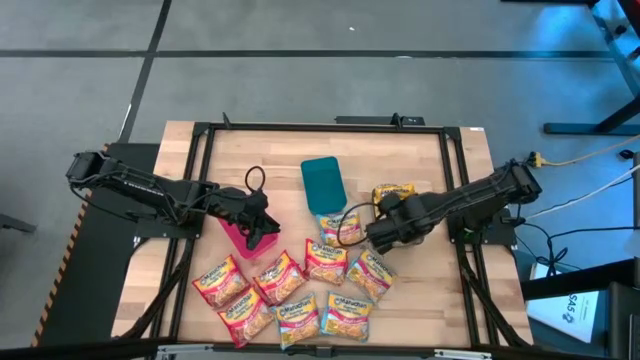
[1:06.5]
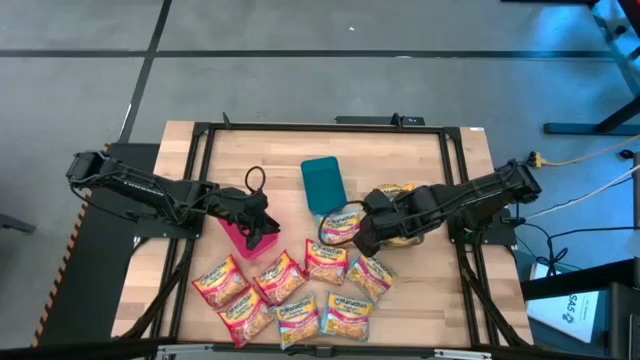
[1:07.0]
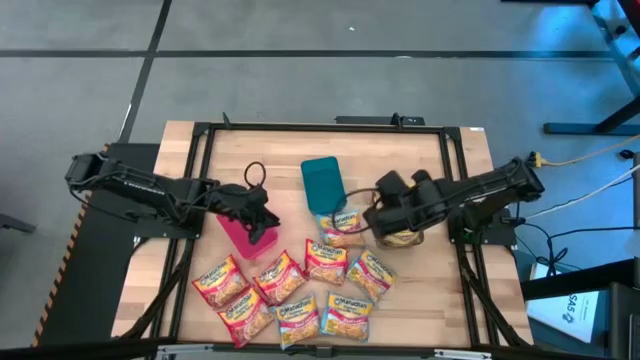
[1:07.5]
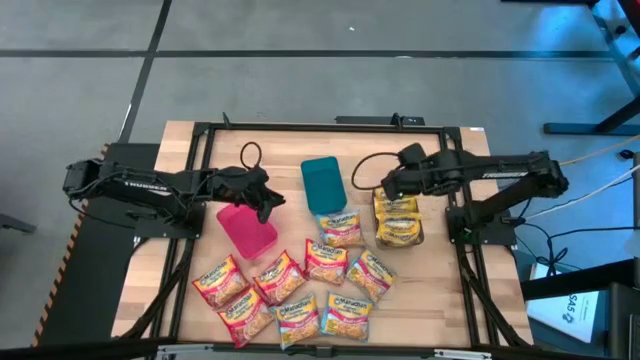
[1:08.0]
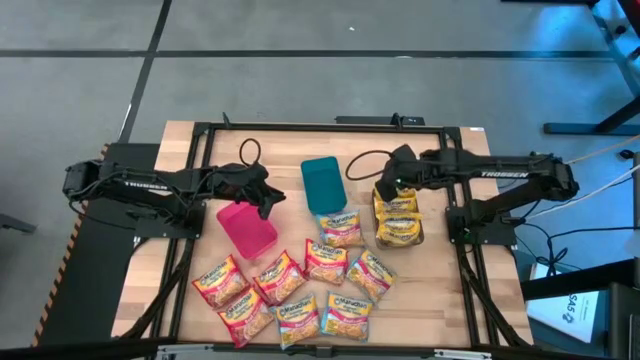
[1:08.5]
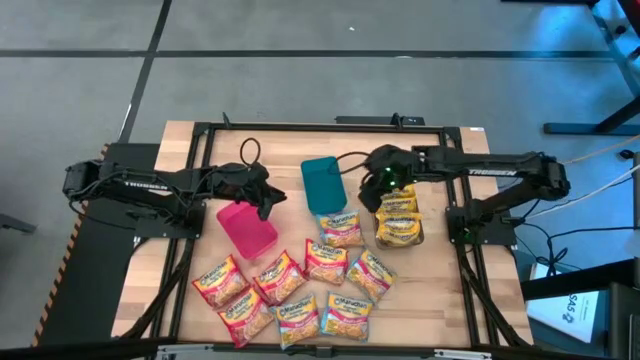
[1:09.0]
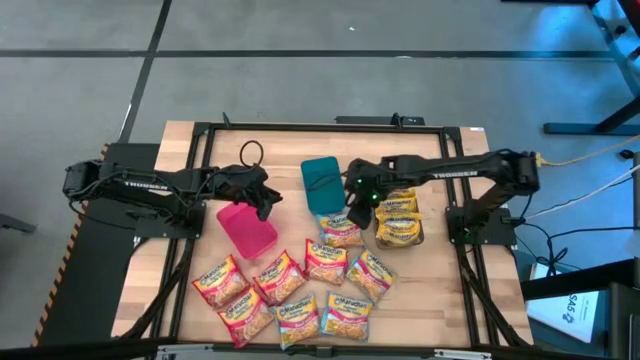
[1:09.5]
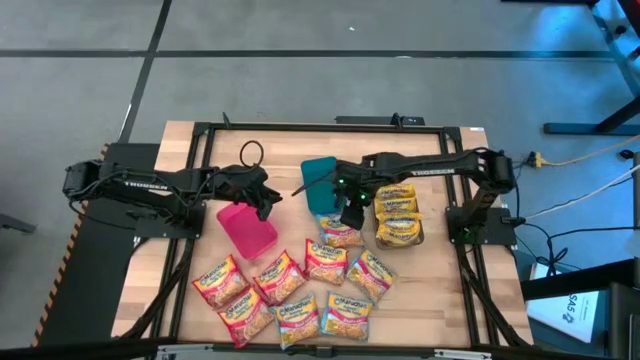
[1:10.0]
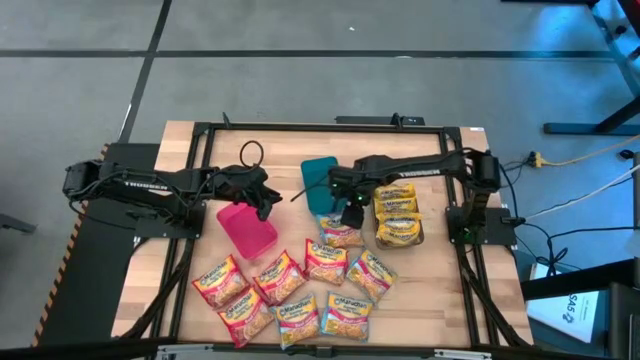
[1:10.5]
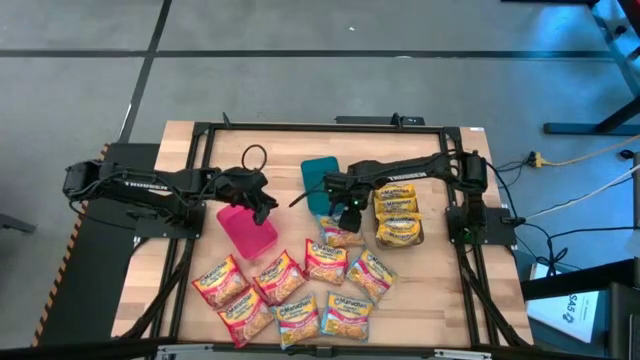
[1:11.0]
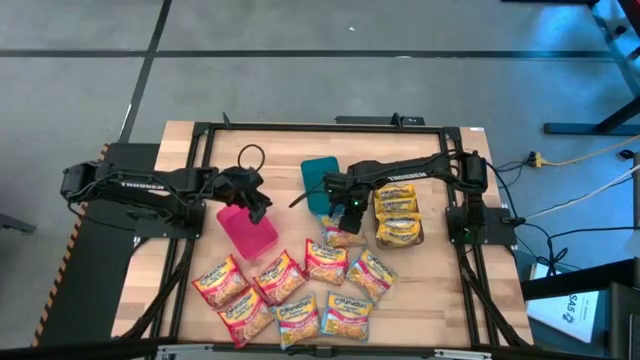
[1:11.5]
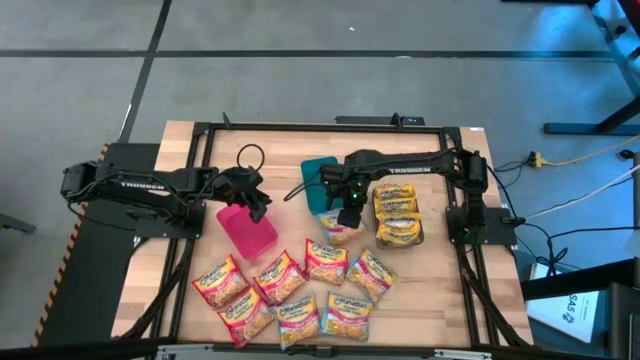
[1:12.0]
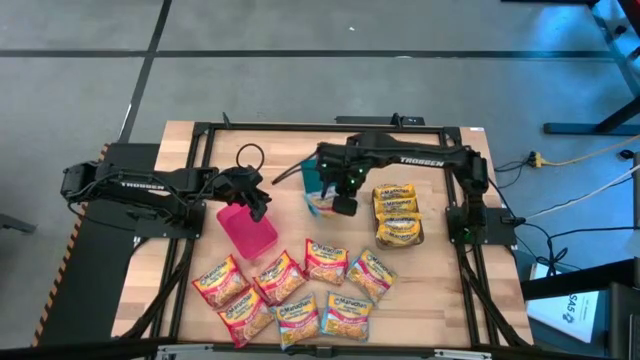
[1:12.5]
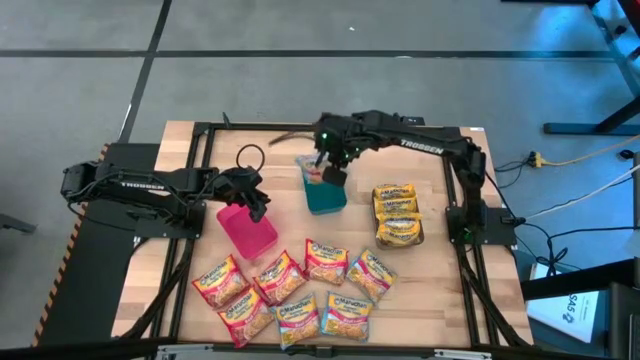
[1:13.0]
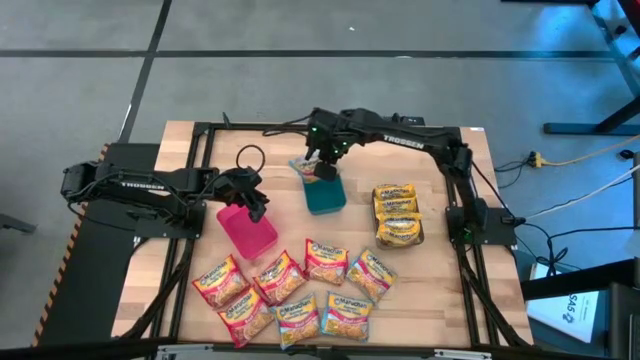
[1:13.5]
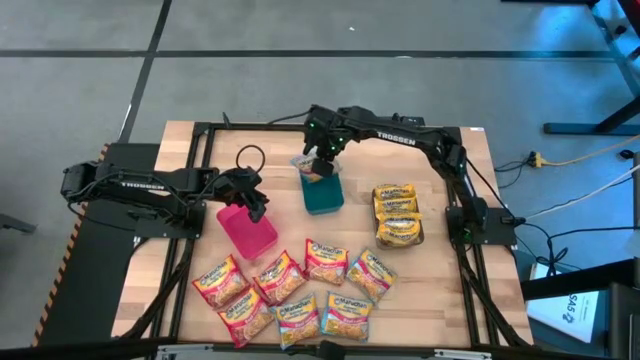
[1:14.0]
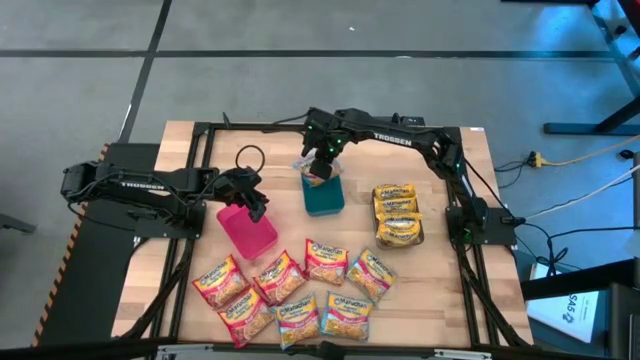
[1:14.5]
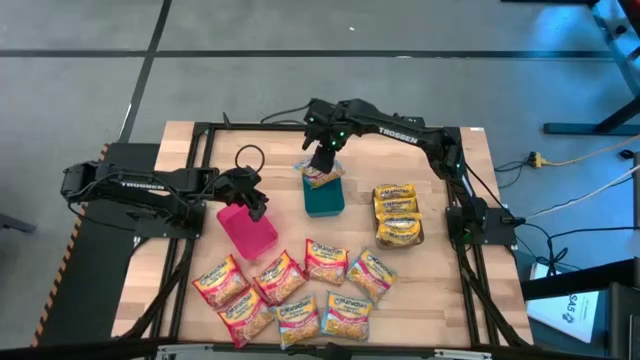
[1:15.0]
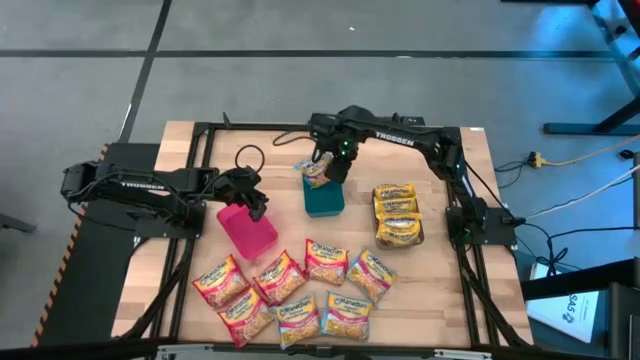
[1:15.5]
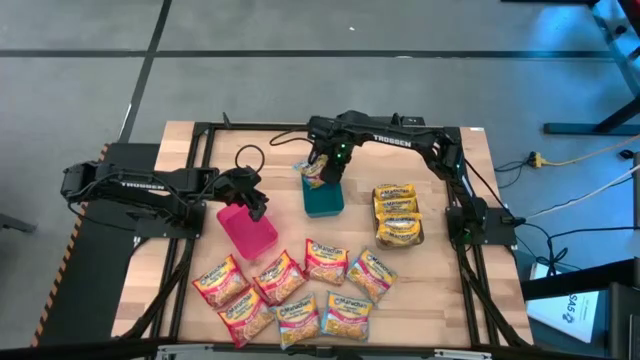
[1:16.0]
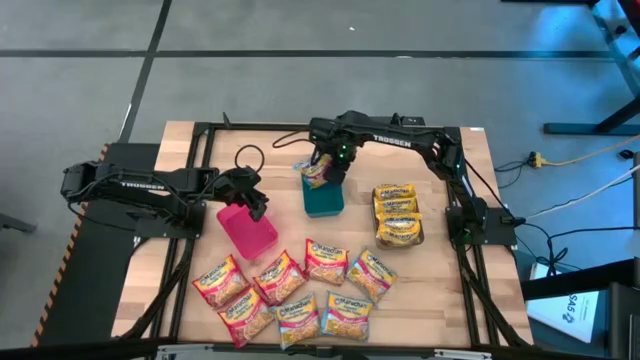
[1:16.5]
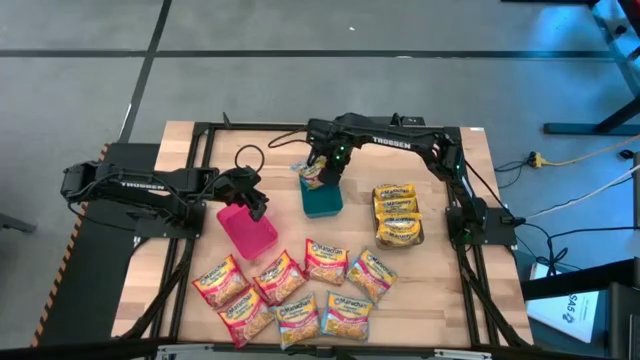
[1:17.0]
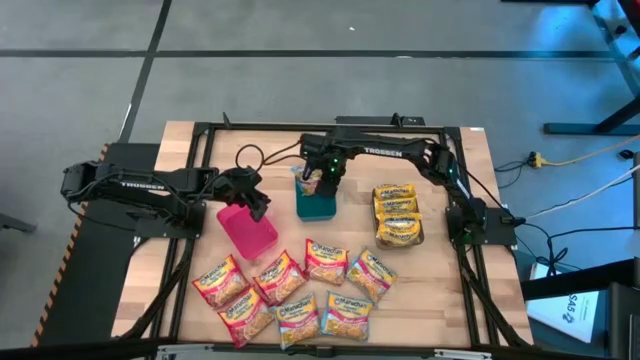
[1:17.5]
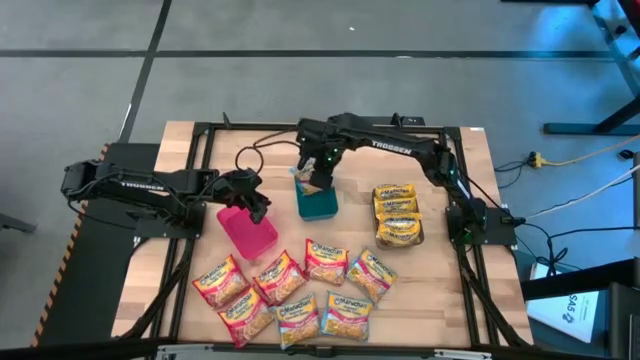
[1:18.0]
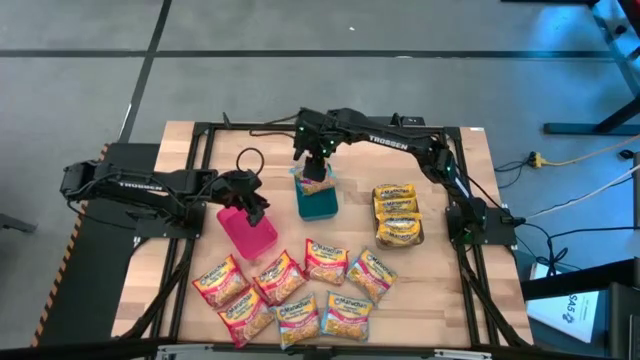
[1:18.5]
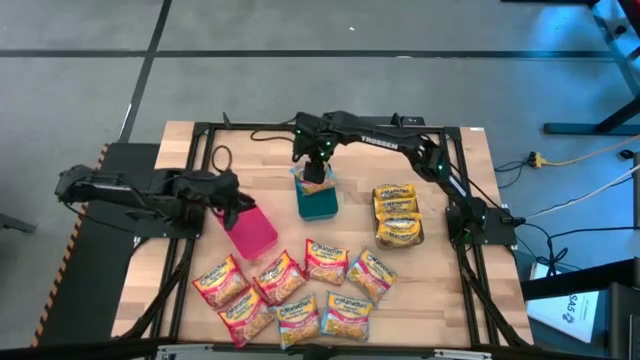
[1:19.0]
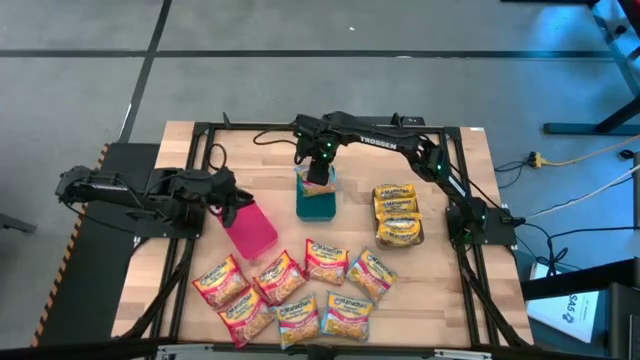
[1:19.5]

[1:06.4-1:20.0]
Task: Sort Maruchan noodles
Put the blue noodle pack into the blue bin
